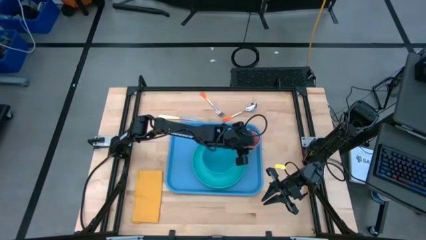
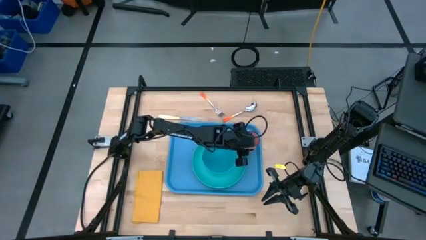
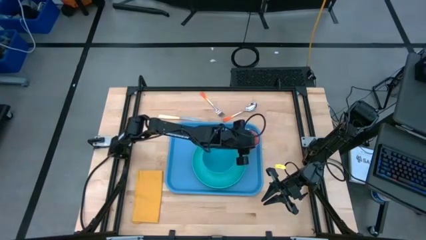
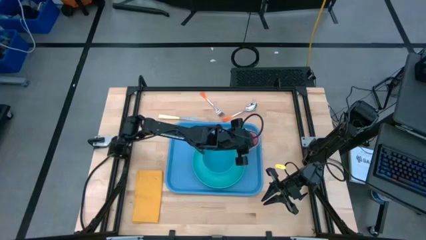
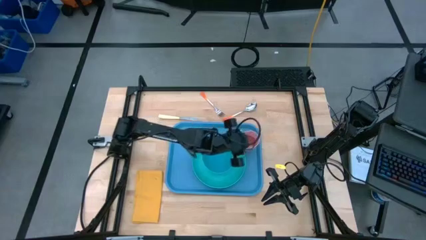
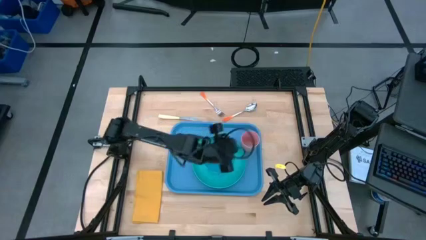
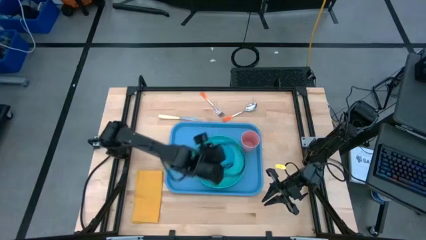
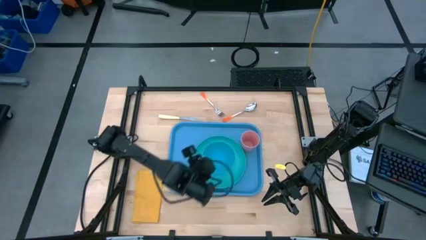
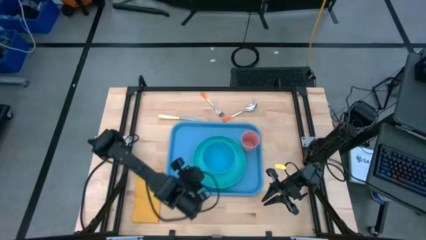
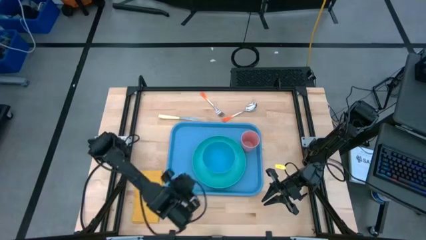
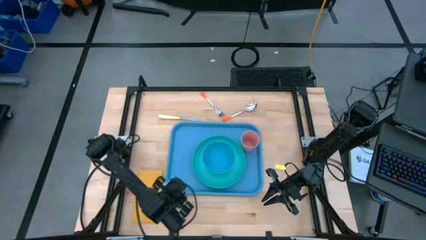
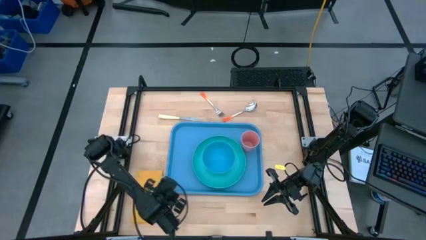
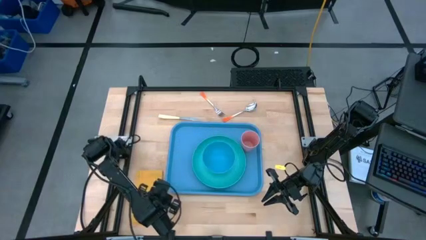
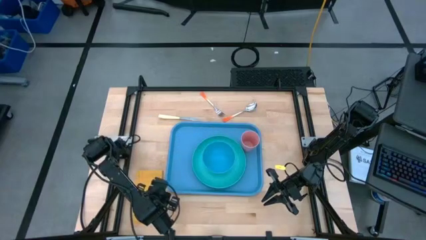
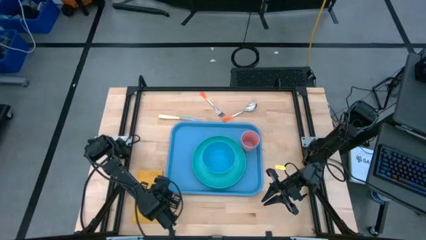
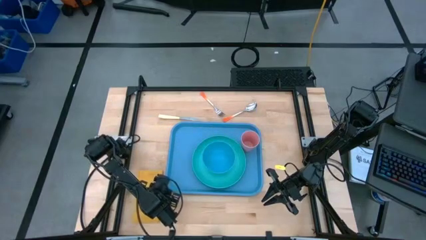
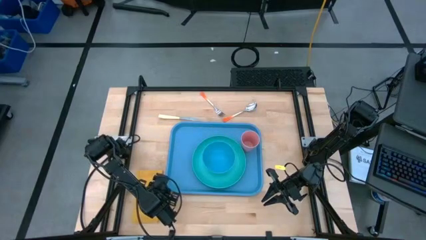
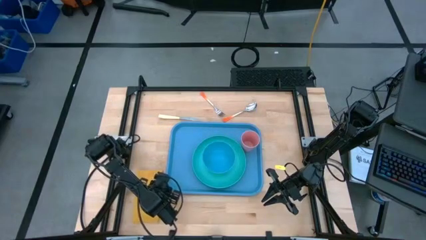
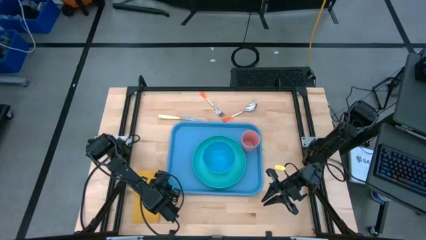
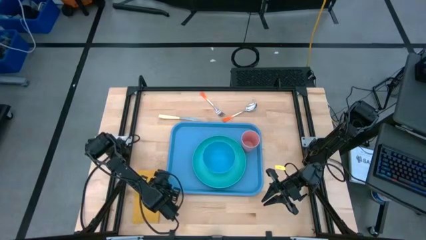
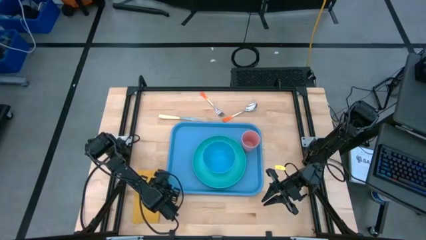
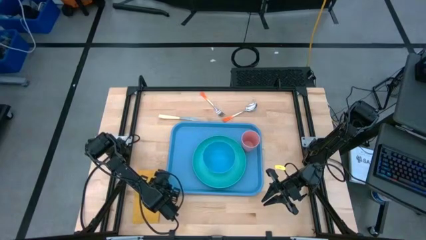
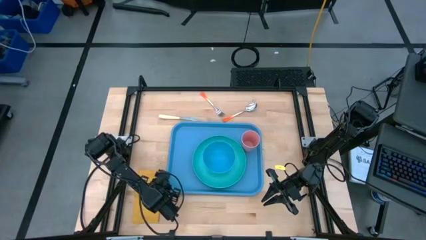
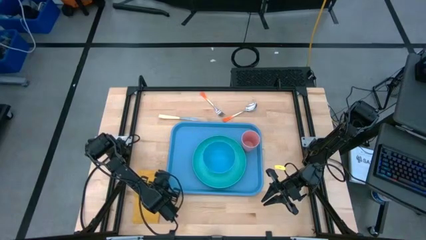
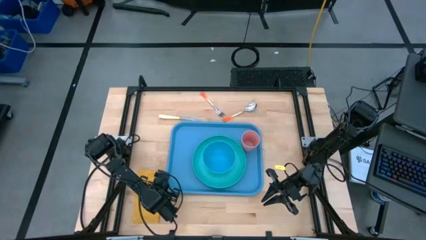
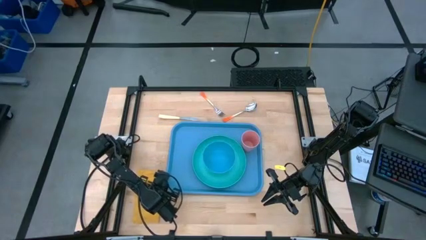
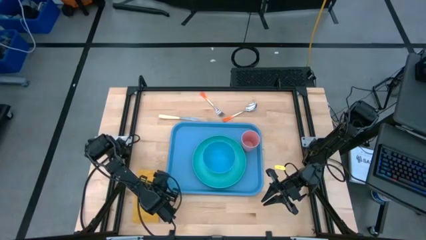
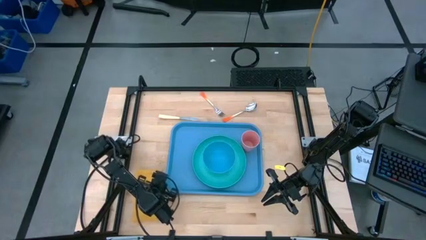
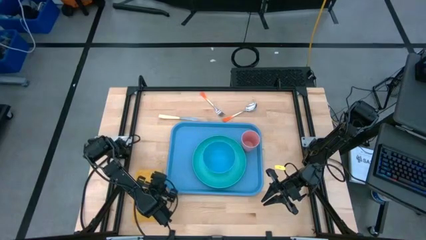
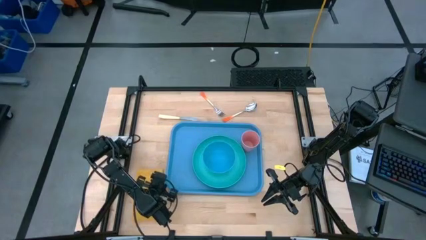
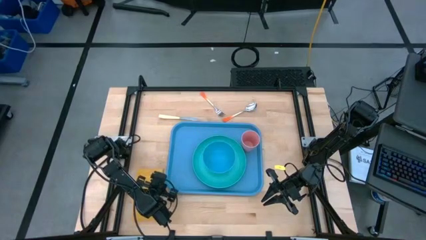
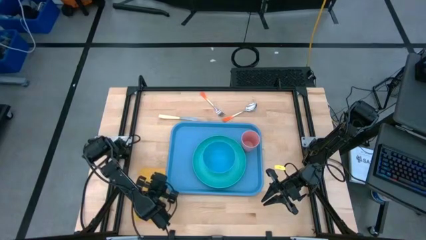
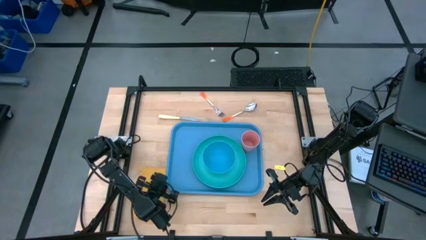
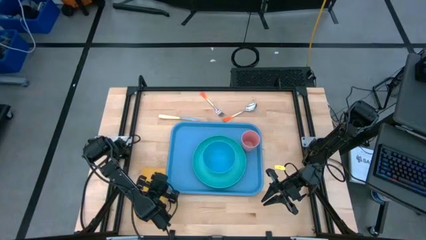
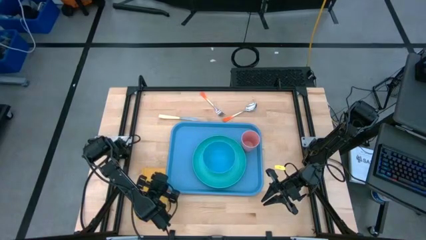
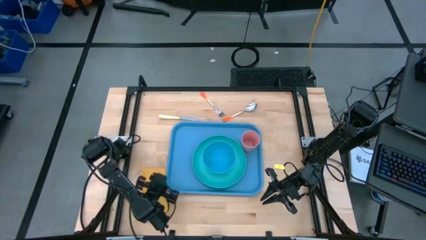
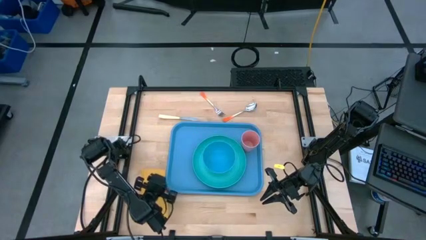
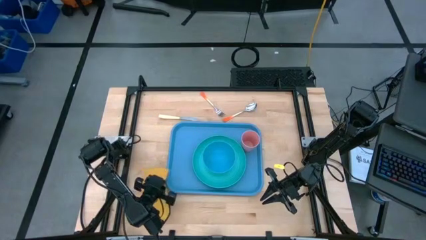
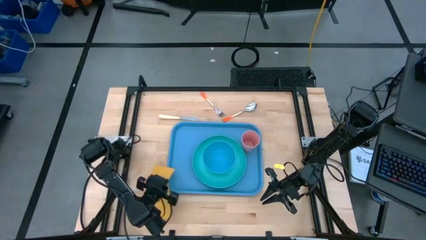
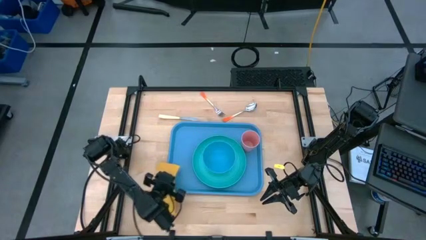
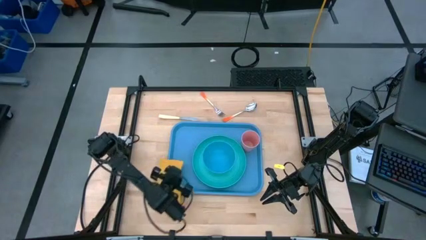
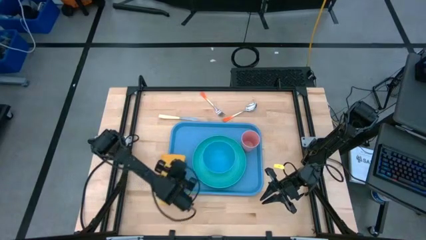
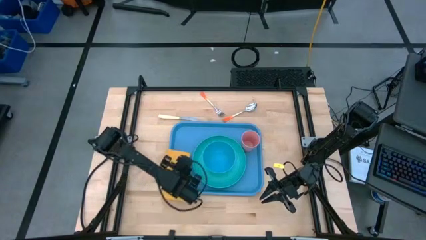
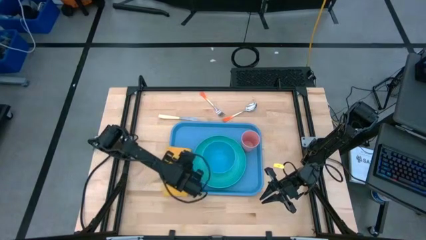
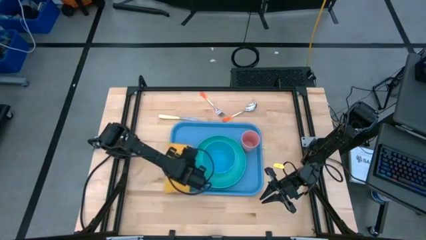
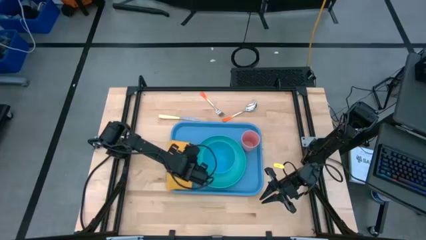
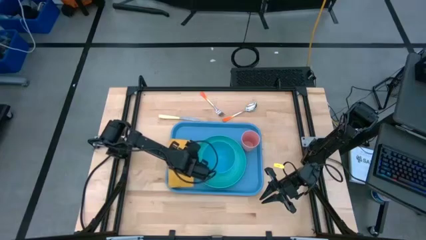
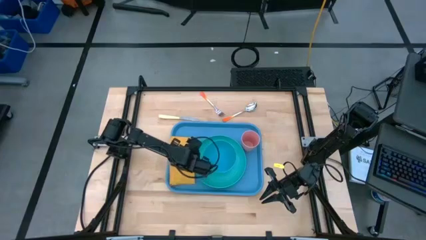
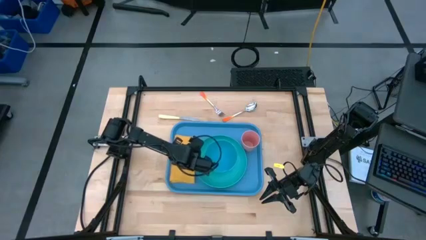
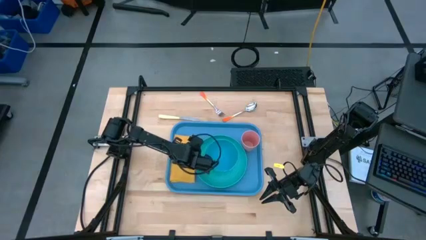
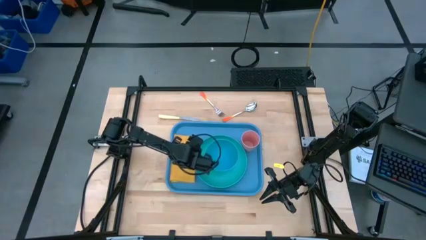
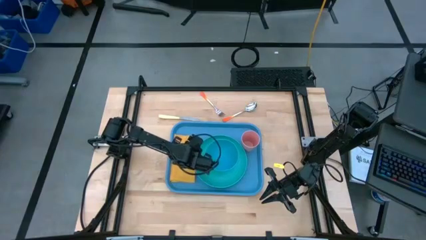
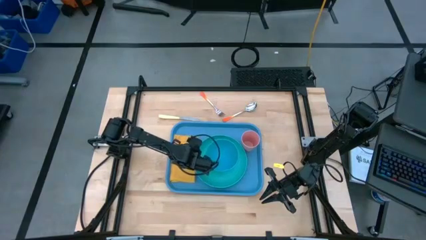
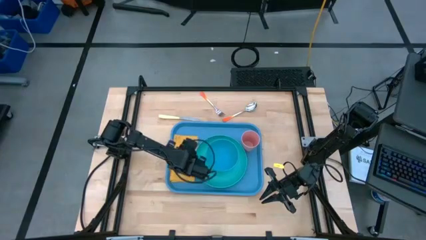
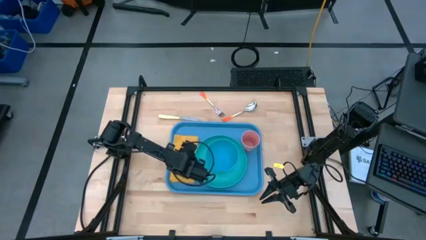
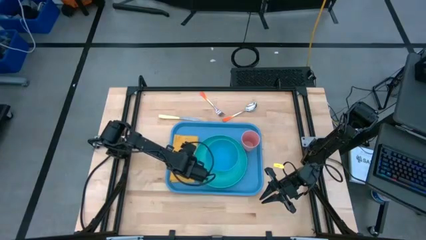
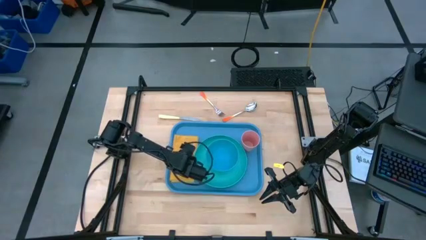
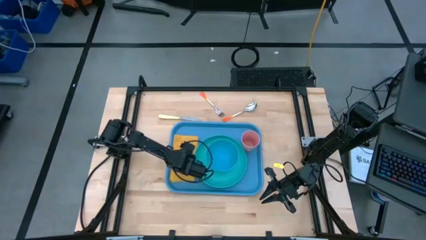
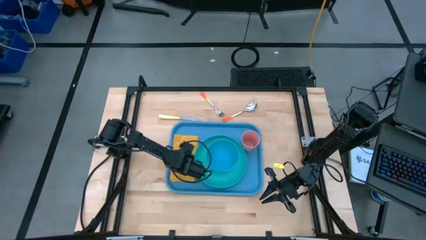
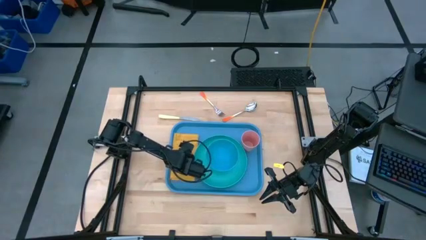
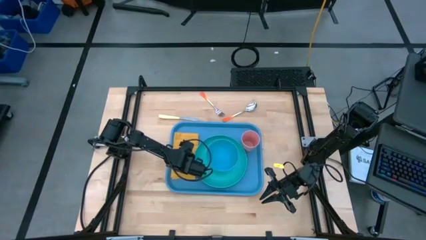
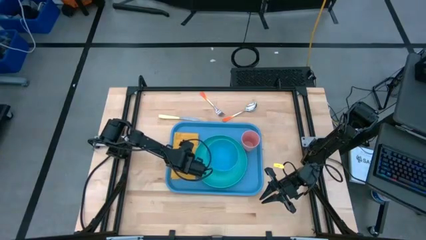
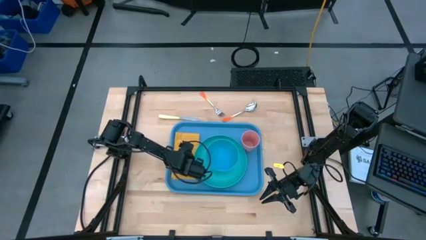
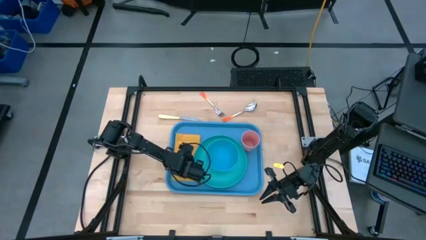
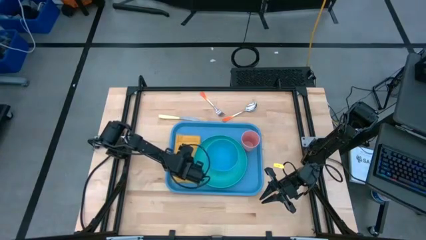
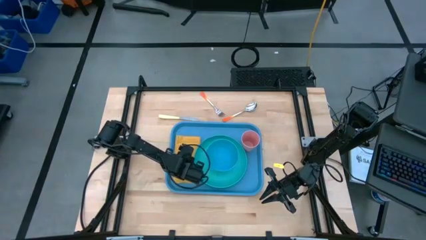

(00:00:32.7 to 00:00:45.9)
Task: Set up tray
Put the yellow napkin on the blue tray

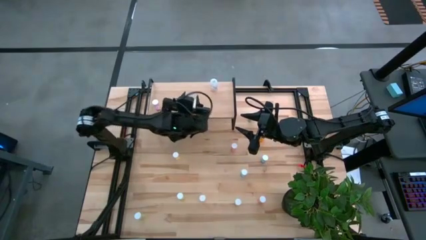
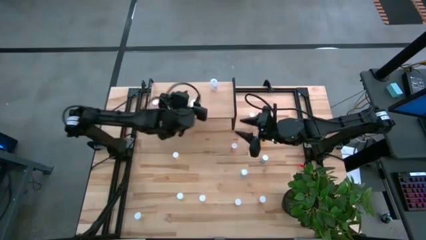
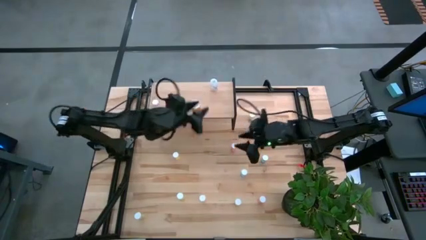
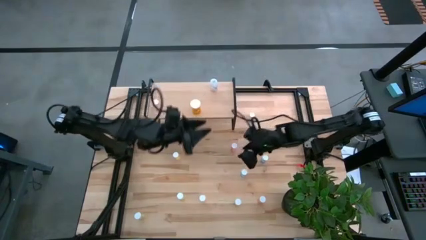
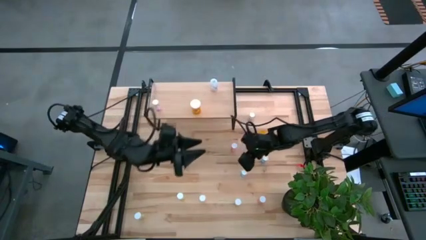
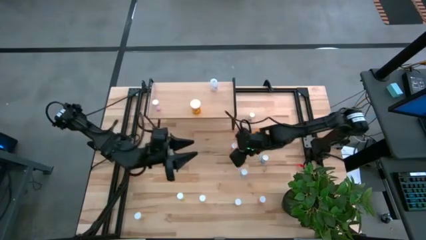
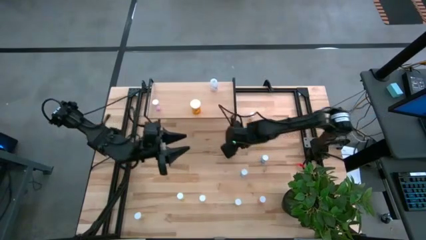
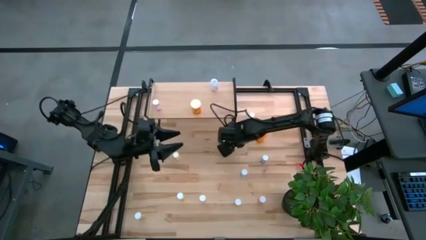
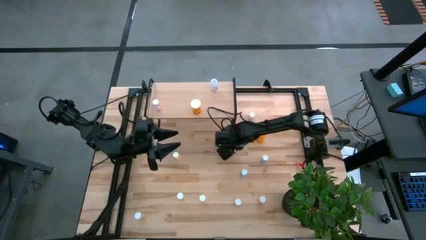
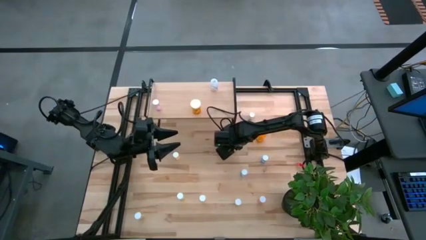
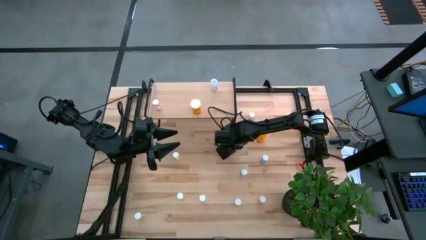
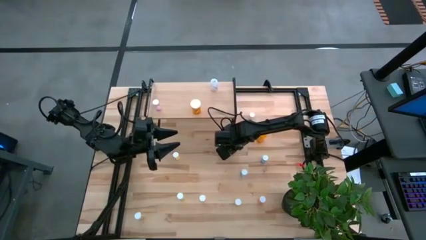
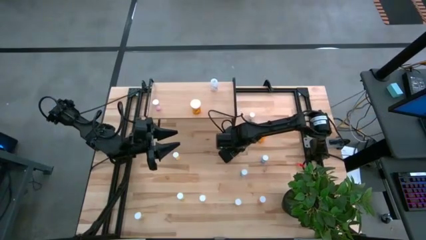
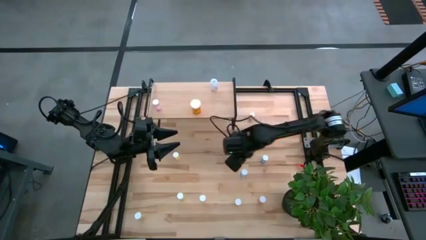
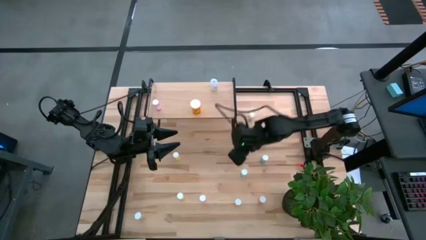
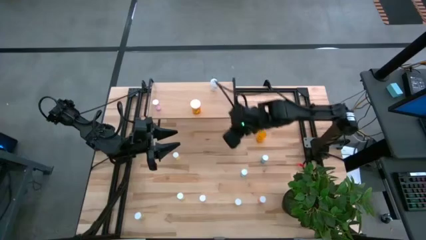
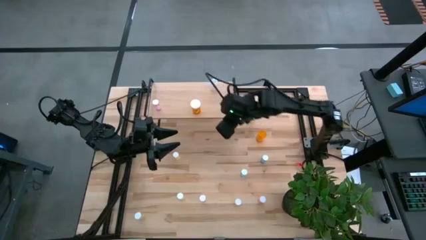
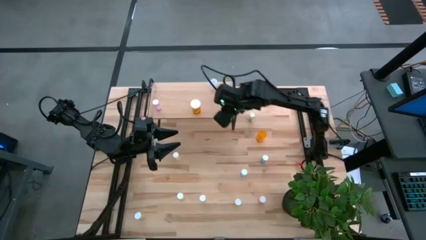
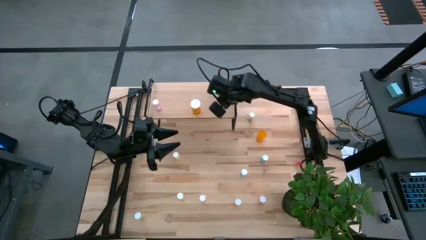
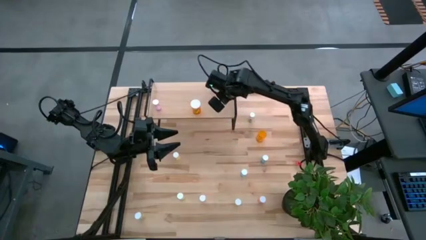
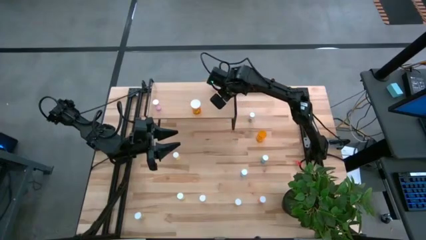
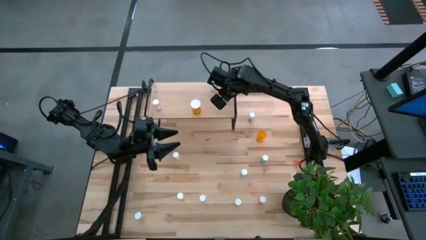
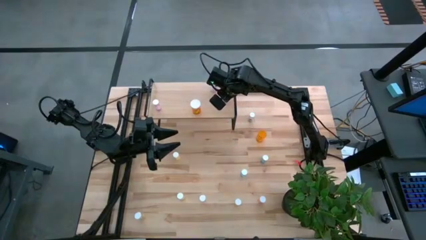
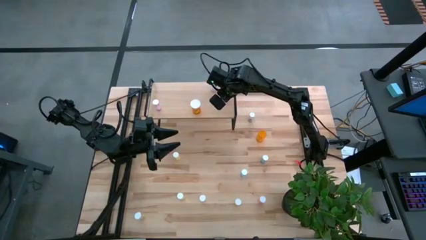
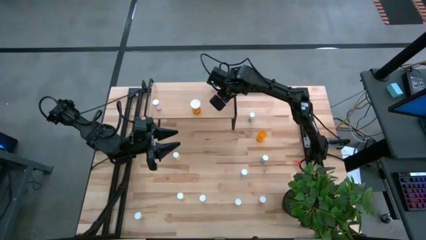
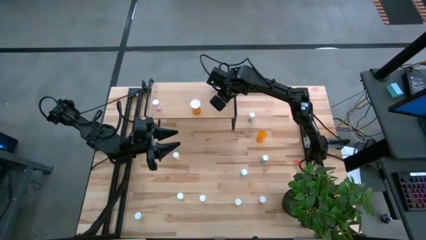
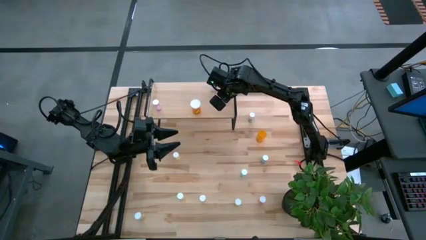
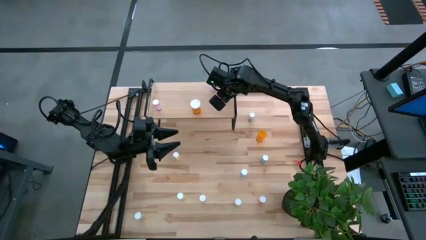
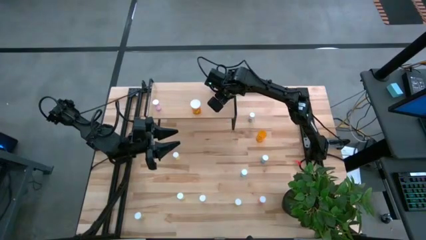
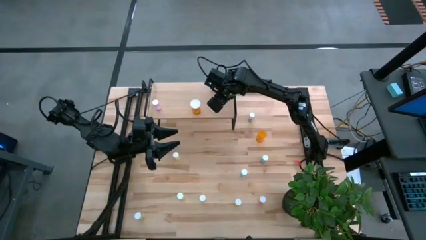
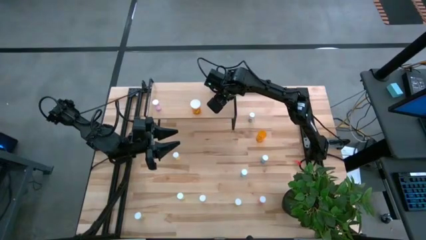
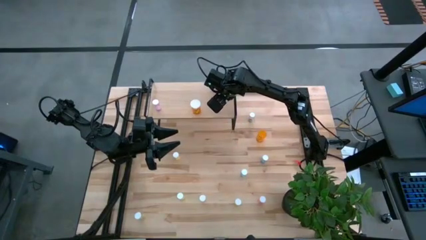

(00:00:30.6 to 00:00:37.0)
Task: Pick and place medicine bottles onto shelf by color
Put the red pill bottle on the shelf
